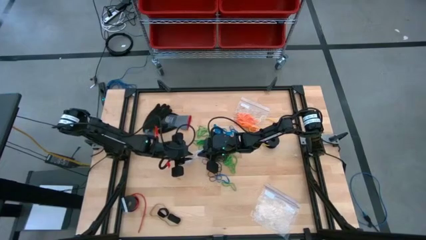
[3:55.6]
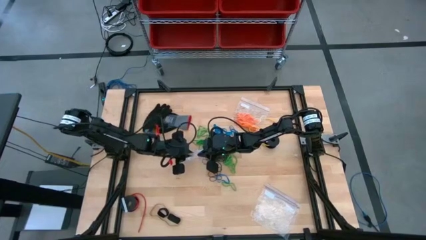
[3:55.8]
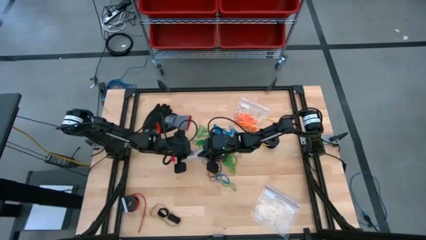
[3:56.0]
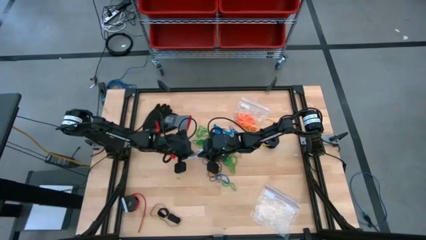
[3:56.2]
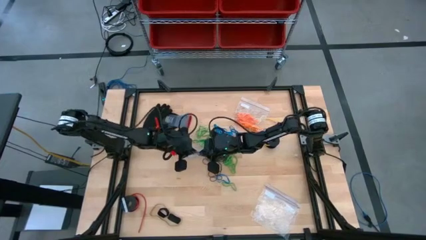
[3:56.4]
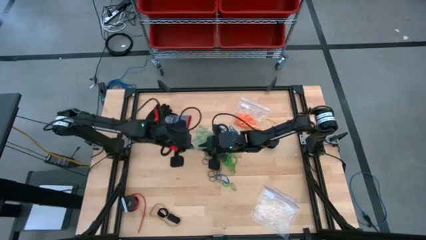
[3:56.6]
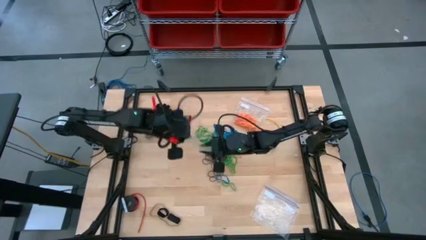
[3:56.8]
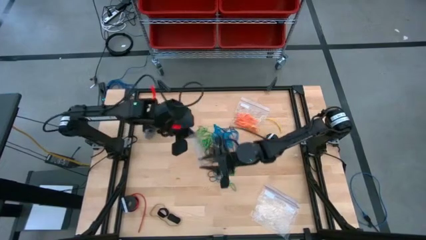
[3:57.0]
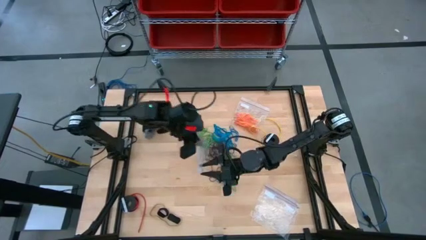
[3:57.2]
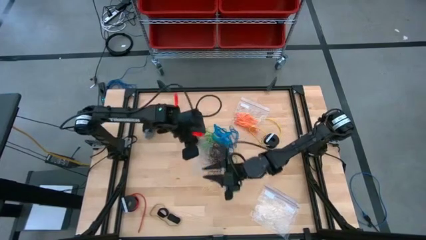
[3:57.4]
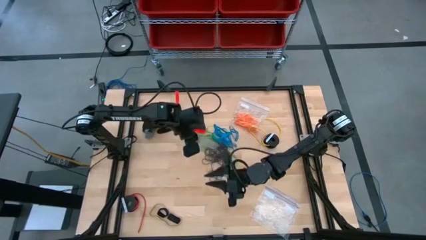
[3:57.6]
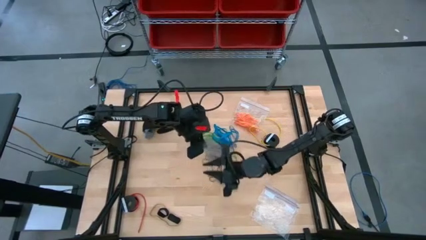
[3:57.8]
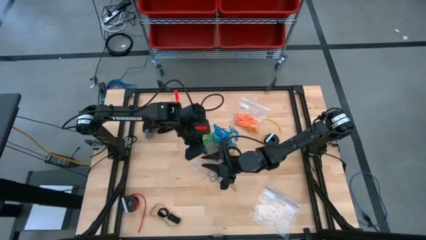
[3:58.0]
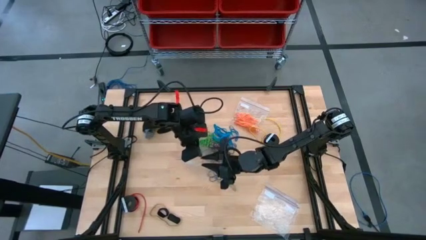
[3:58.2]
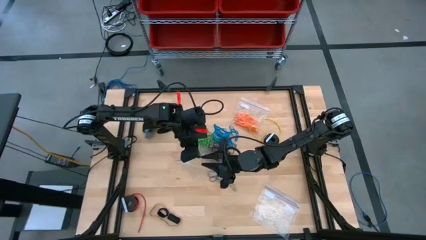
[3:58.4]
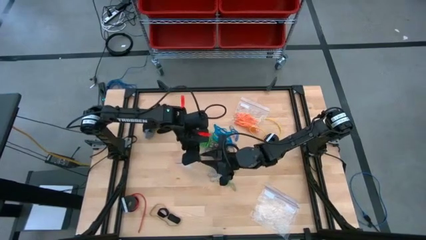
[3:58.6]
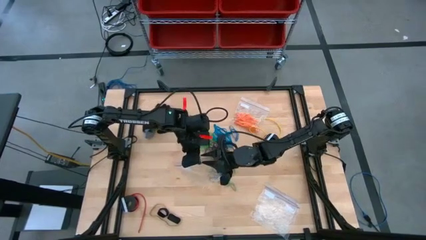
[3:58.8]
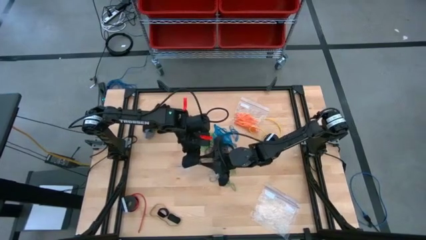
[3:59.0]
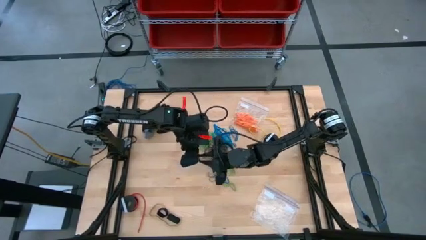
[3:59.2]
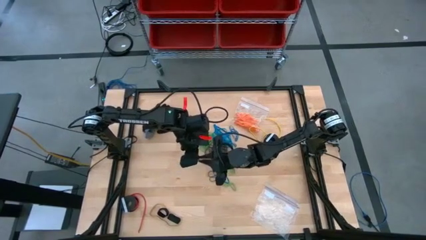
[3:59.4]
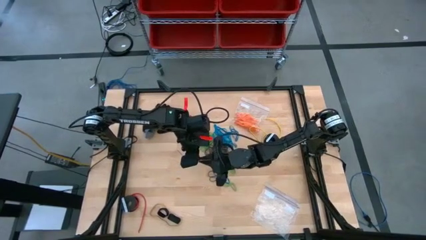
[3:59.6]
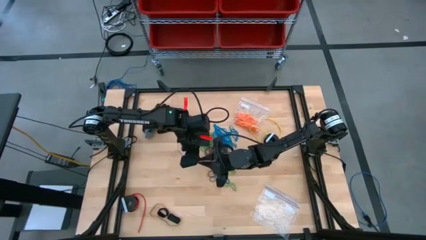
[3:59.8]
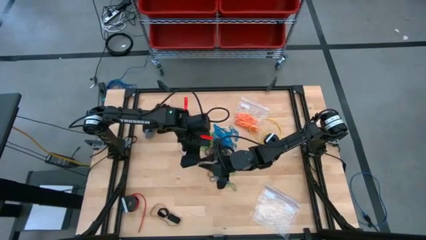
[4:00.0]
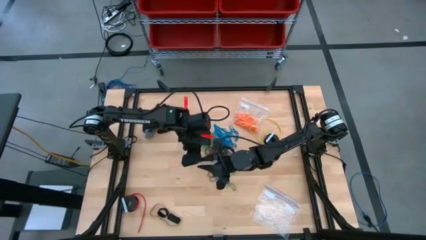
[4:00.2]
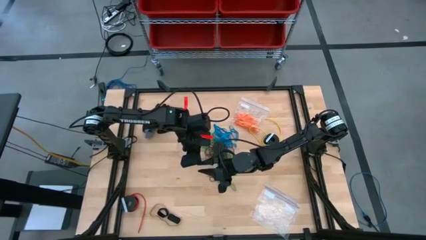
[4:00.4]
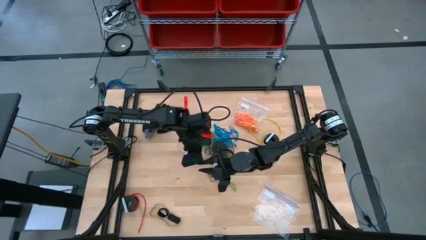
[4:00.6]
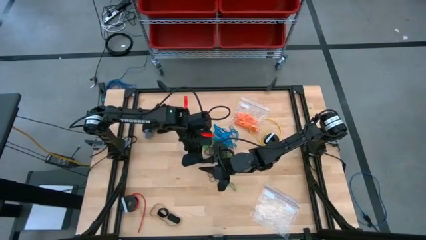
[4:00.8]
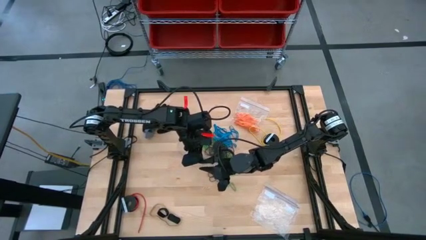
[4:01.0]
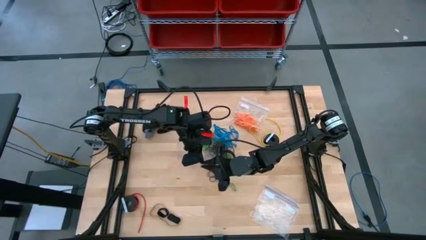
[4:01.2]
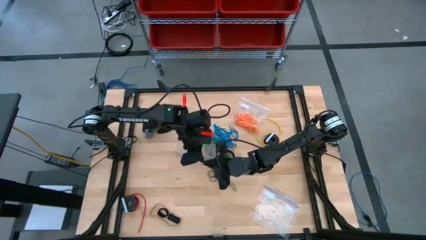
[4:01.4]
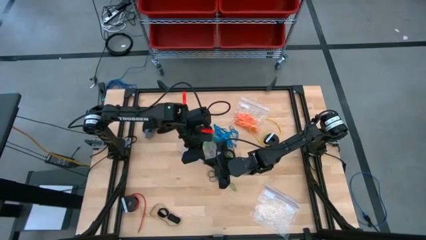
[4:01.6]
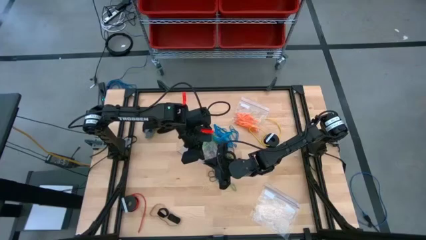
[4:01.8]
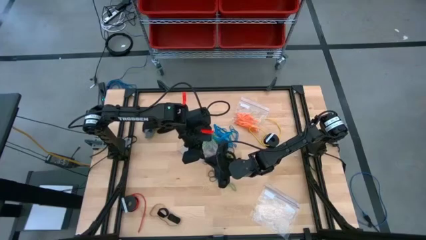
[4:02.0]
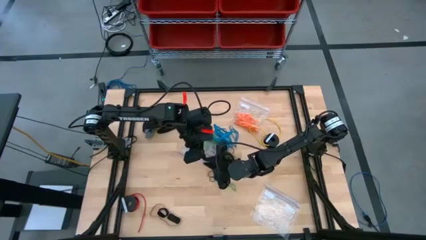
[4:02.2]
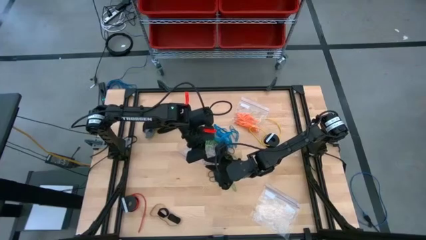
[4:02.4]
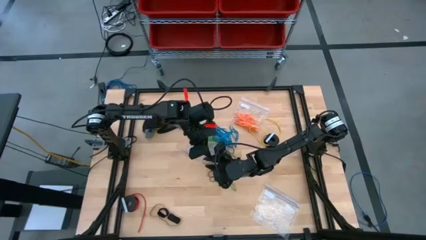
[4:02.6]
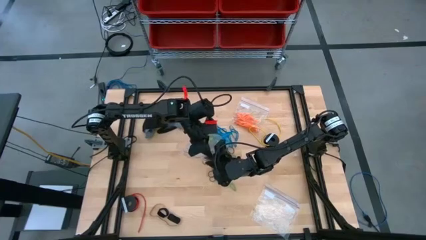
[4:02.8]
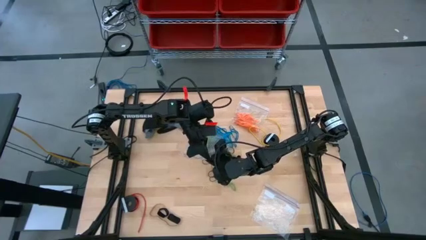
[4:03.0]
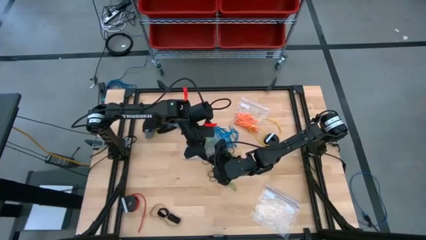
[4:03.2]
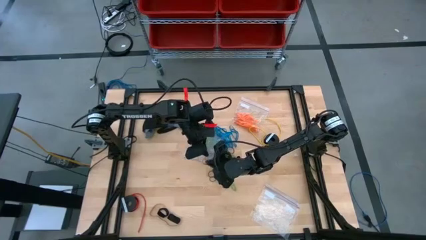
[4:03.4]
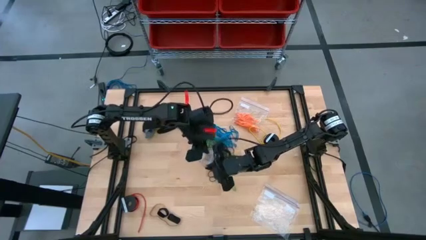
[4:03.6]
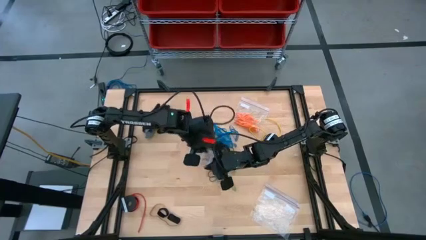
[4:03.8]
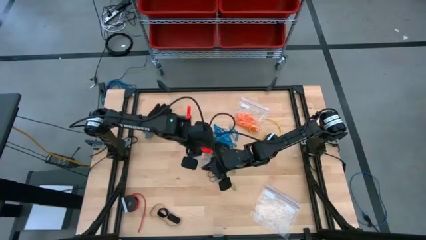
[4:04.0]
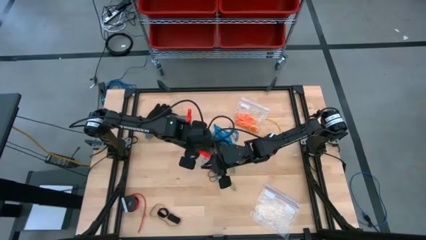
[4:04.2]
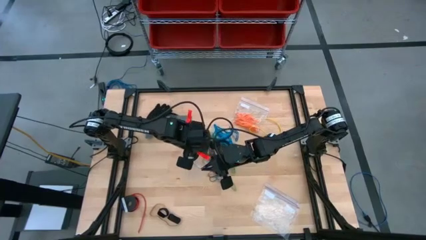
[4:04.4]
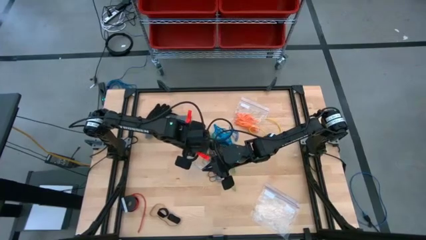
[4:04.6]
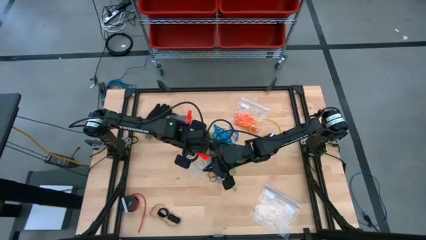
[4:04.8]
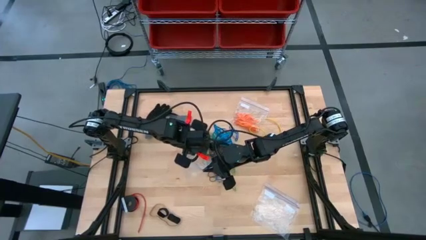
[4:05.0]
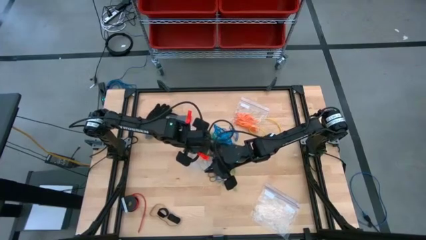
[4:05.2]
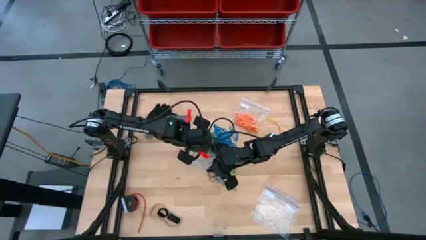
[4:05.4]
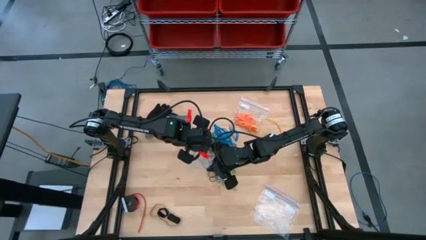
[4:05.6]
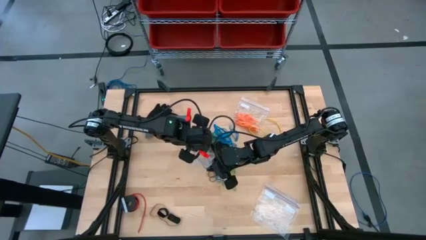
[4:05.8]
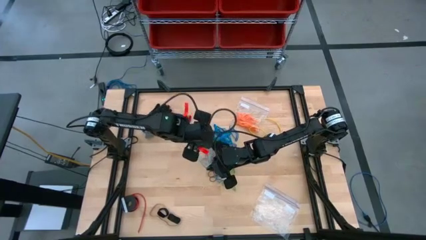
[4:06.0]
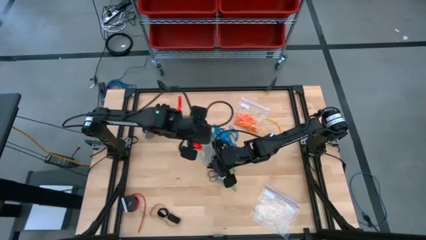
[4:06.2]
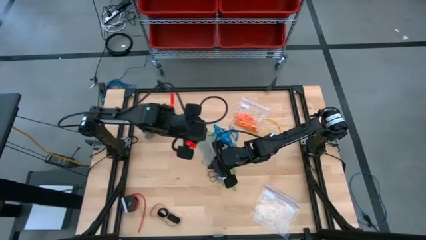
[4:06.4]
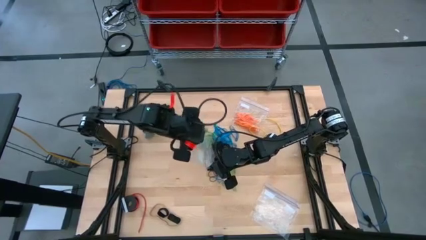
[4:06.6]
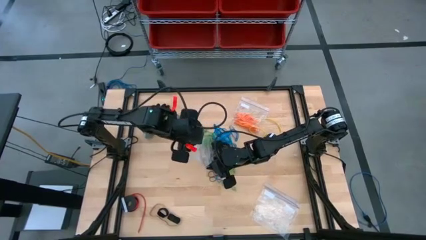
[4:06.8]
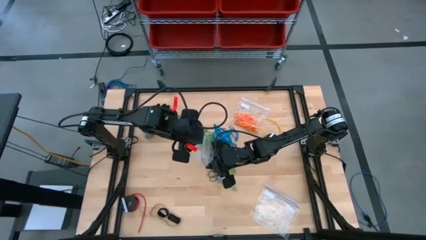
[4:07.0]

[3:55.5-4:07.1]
Task: Sort rubber bands
Open the transparent zip bag

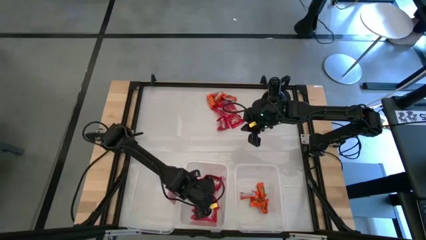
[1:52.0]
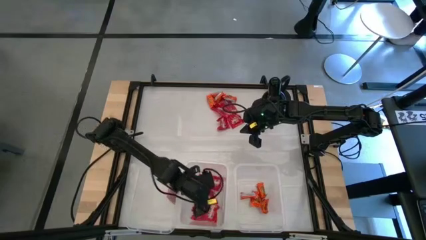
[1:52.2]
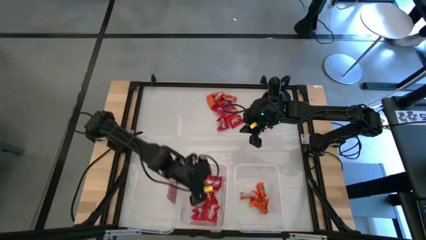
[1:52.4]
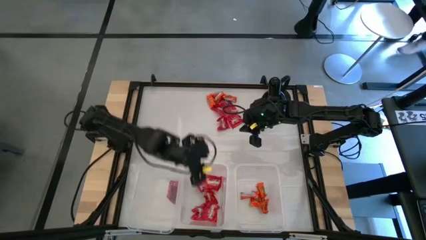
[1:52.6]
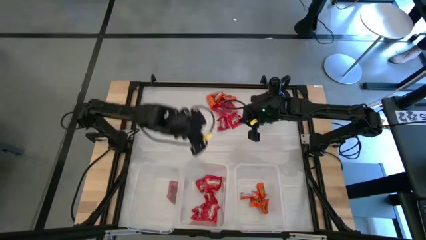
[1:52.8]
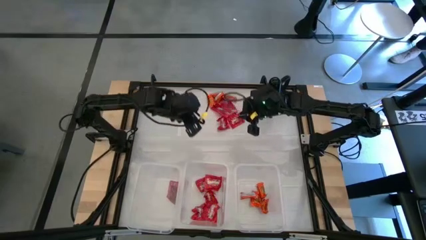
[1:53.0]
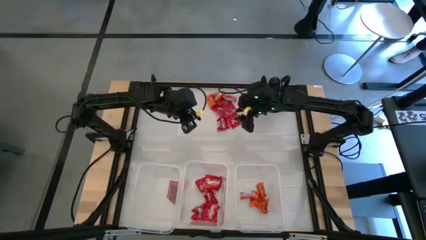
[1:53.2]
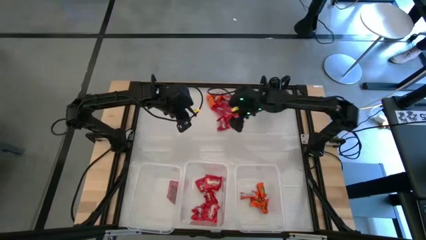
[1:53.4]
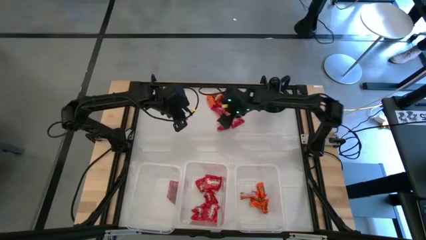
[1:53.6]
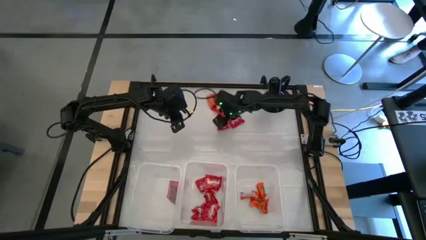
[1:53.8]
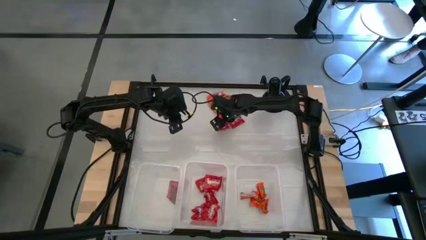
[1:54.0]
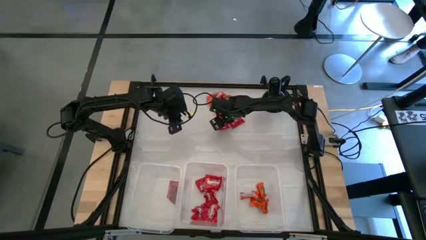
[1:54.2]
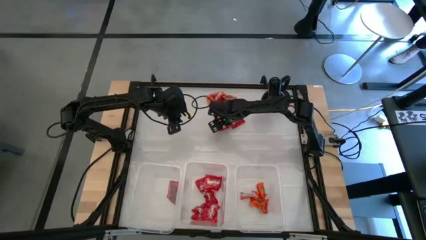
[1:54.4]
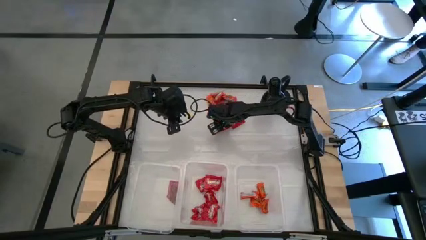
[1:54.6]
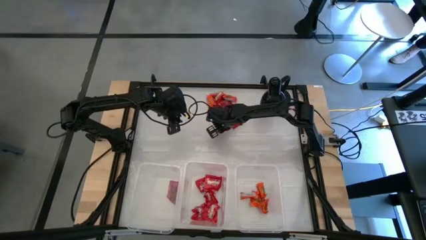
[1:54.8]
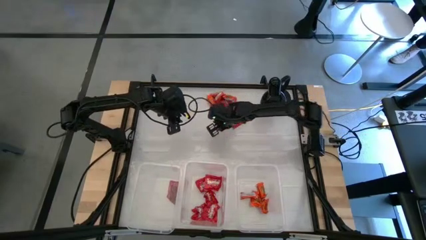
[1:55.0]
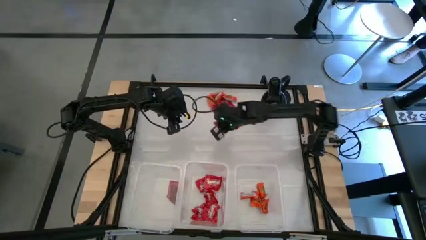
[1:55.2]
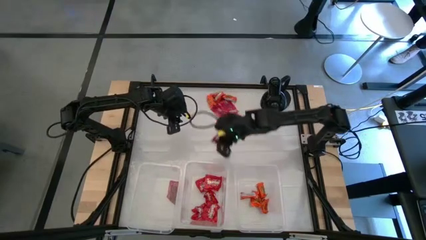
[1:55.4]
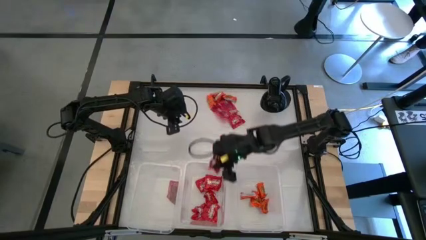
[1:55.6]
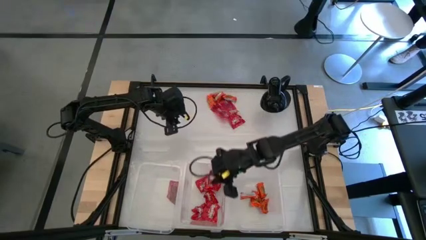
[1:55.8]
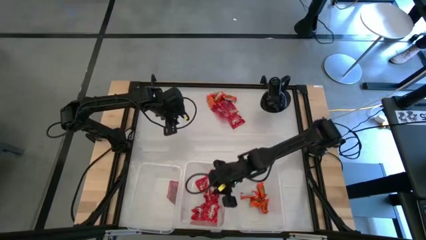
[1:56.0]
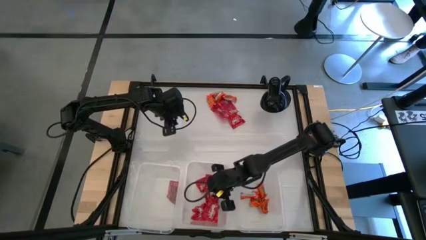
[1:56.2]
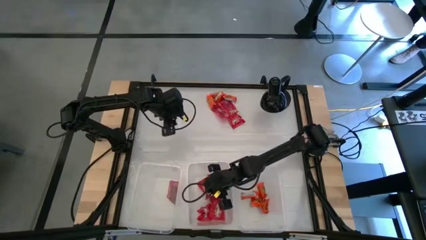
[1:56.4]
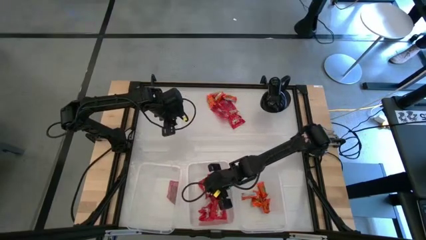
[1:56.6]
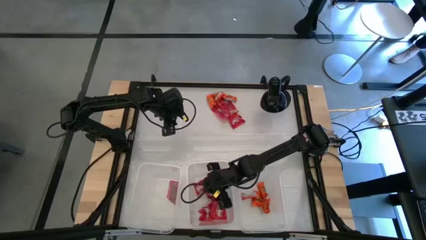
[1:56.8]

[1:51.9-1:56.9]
Task: Sort candy
Put the red candy into the middle transparent bin

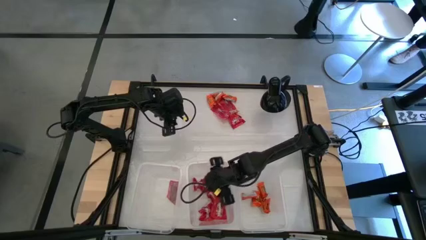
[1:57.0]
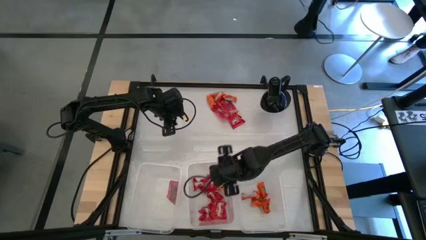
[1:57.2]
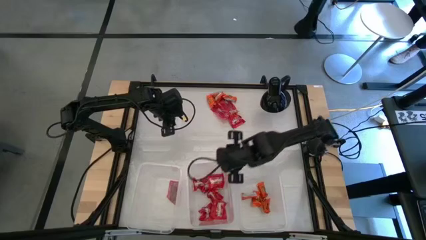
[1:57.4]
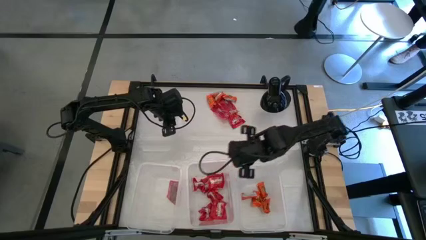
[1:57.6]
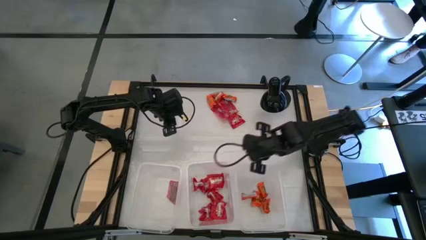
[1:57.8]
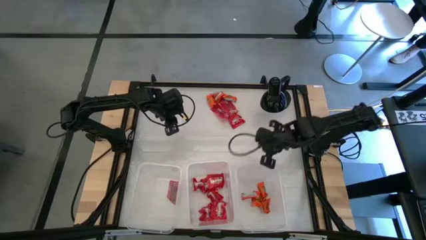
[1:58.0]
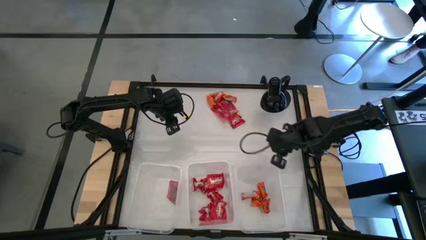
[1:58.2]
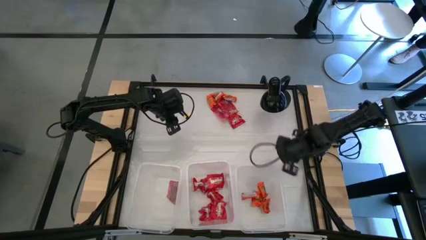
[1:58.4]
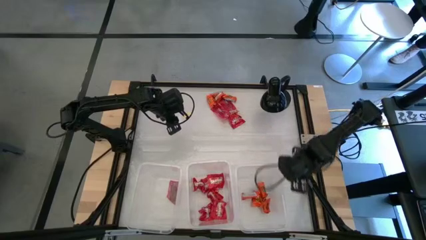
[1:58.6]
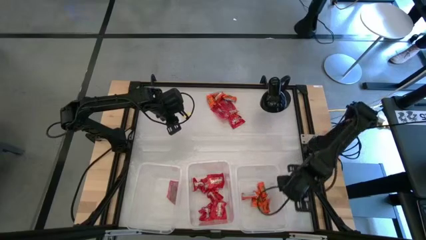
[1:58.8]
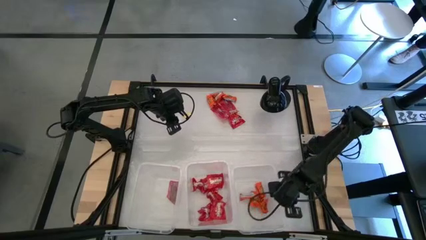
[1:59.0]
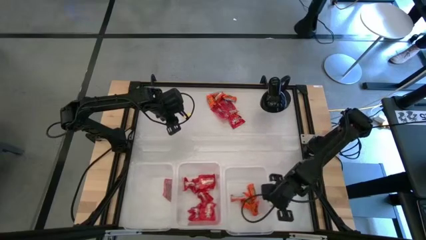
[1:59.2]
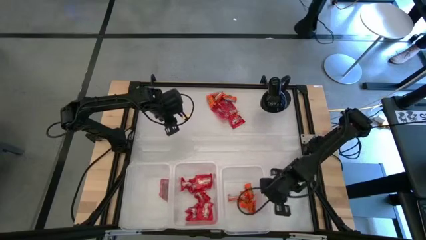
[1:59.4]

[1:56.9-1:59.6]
Adjust the right transparent bin
